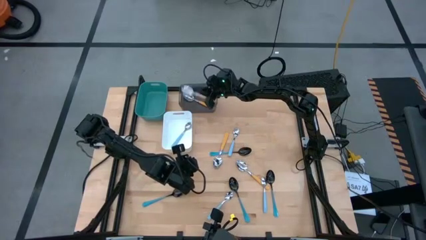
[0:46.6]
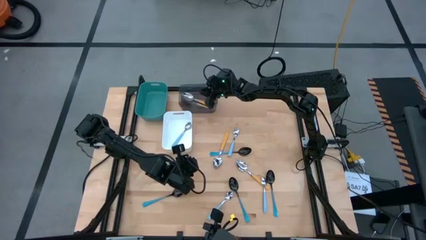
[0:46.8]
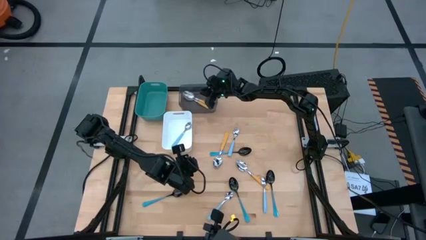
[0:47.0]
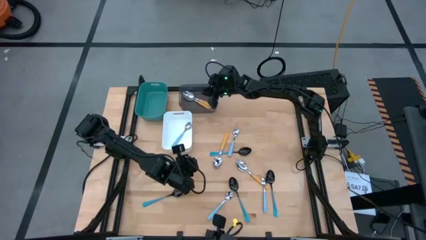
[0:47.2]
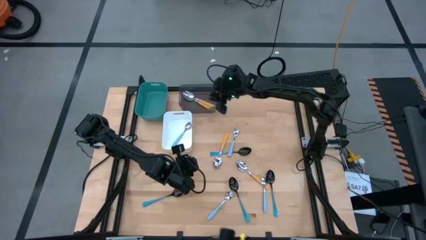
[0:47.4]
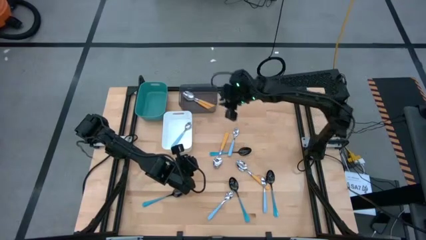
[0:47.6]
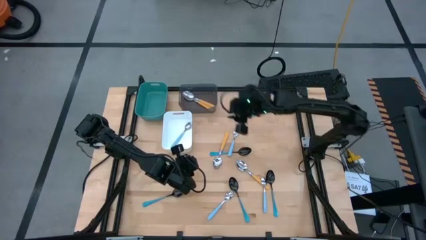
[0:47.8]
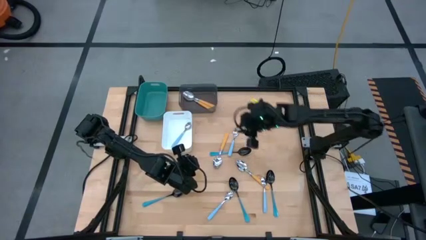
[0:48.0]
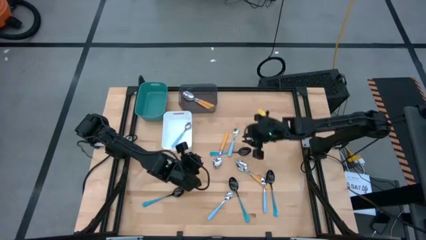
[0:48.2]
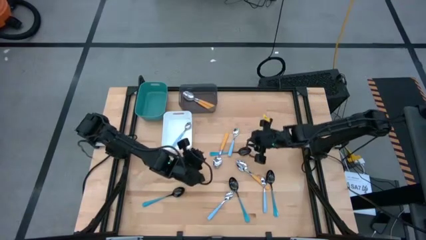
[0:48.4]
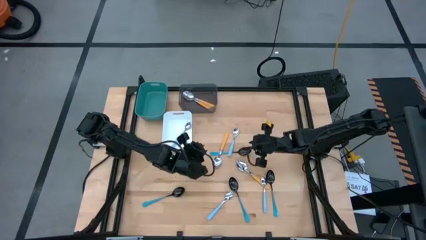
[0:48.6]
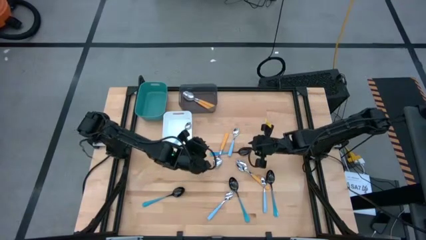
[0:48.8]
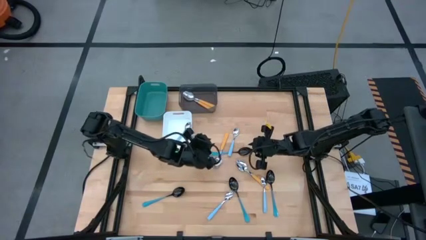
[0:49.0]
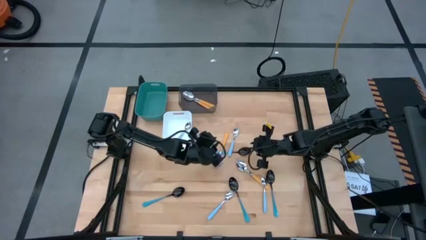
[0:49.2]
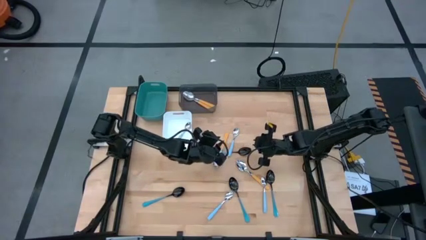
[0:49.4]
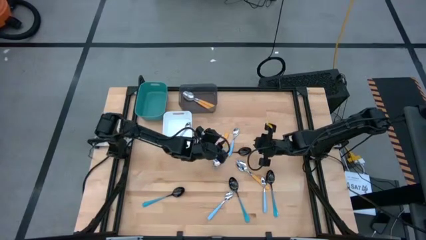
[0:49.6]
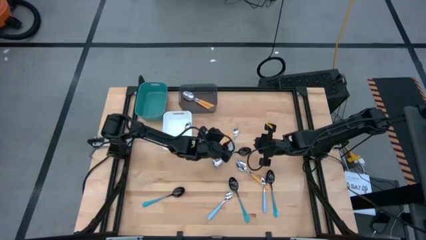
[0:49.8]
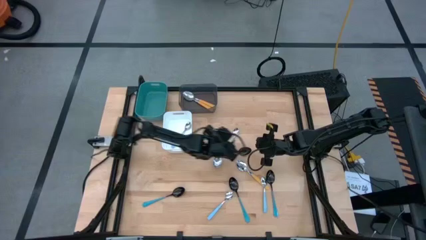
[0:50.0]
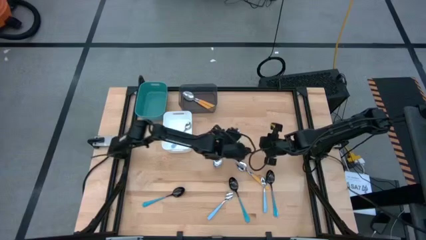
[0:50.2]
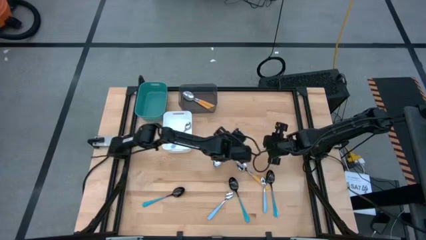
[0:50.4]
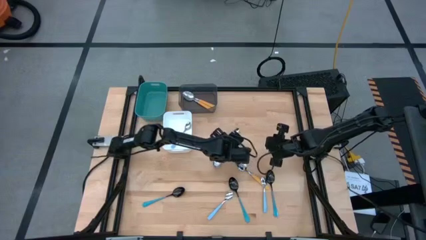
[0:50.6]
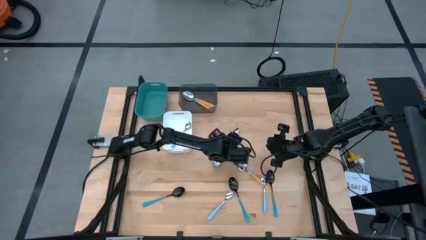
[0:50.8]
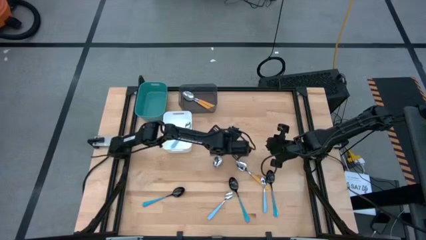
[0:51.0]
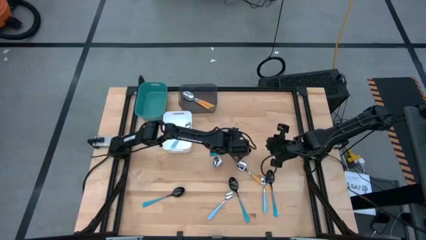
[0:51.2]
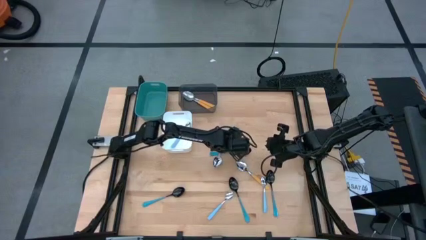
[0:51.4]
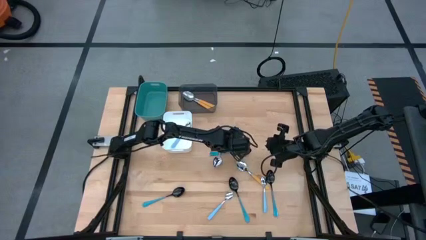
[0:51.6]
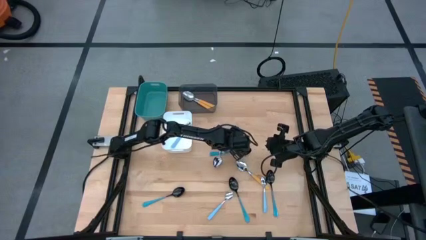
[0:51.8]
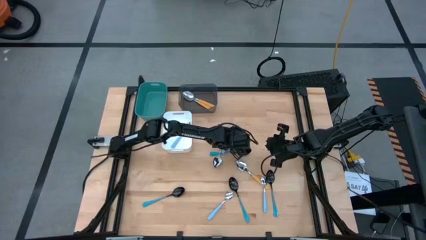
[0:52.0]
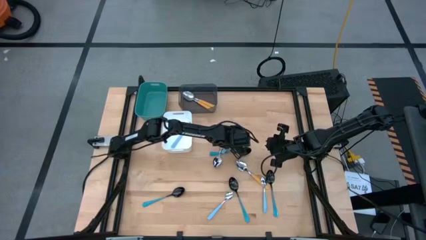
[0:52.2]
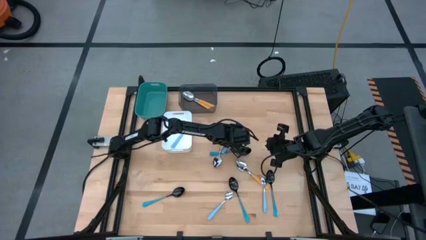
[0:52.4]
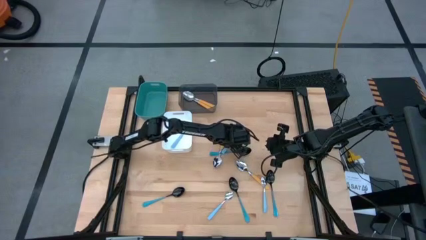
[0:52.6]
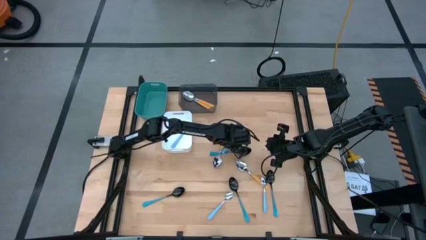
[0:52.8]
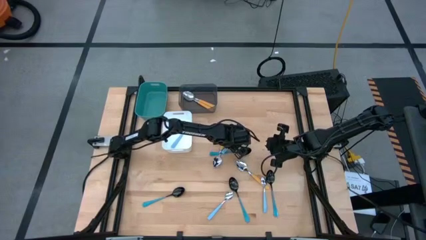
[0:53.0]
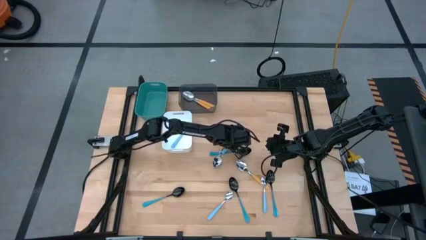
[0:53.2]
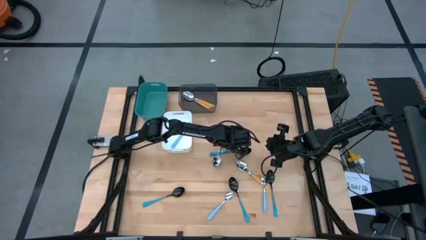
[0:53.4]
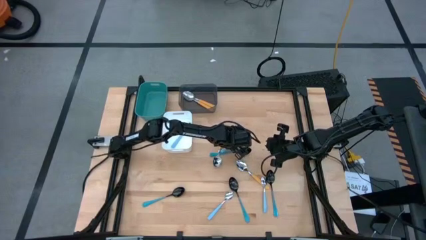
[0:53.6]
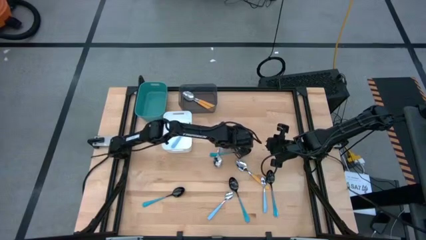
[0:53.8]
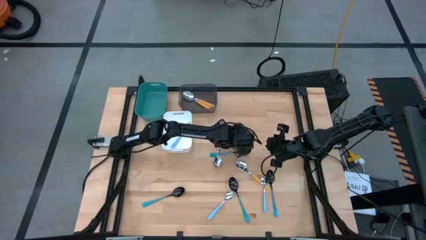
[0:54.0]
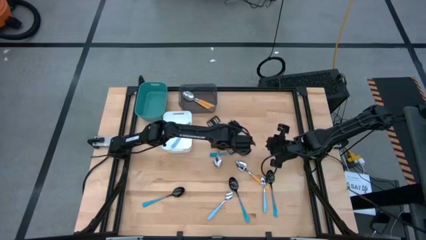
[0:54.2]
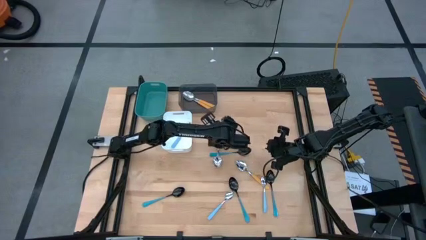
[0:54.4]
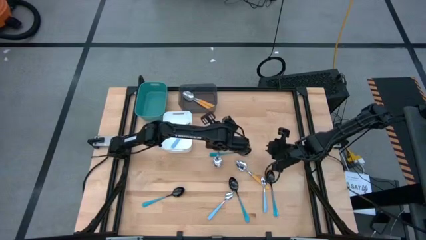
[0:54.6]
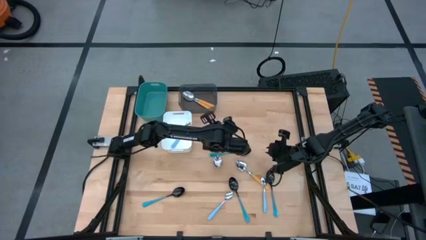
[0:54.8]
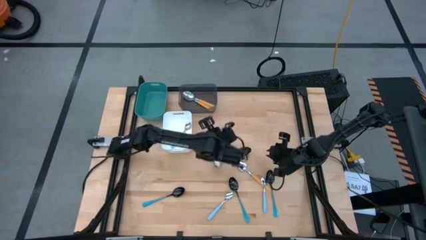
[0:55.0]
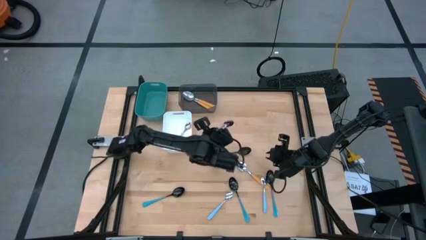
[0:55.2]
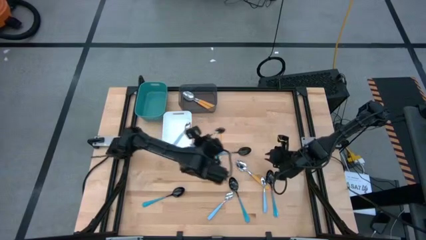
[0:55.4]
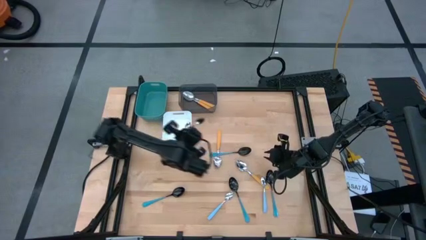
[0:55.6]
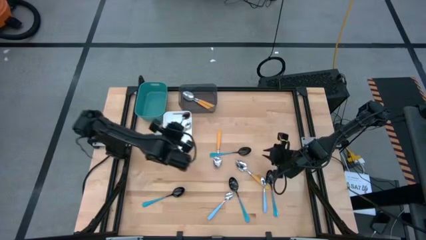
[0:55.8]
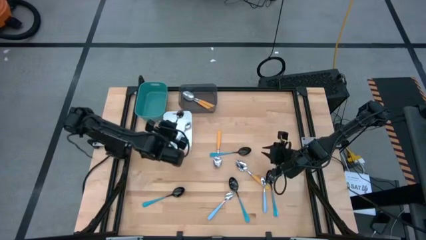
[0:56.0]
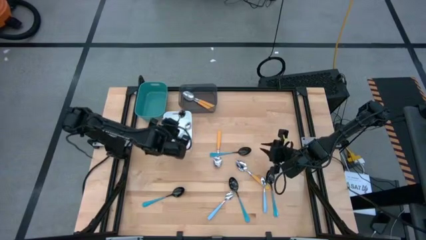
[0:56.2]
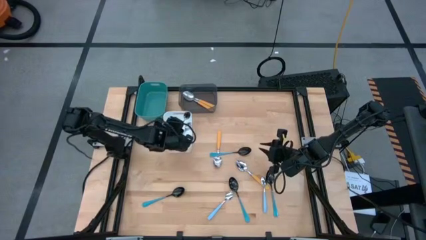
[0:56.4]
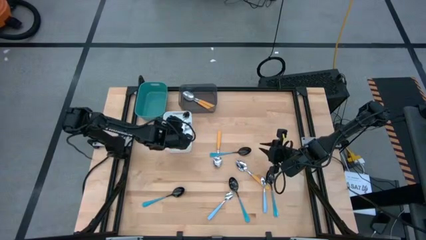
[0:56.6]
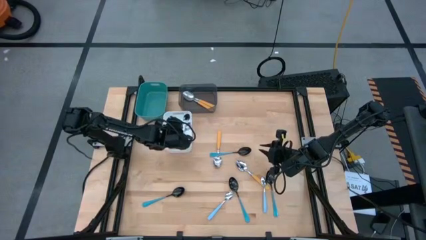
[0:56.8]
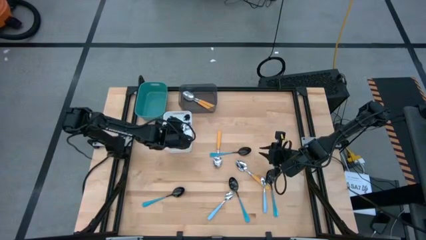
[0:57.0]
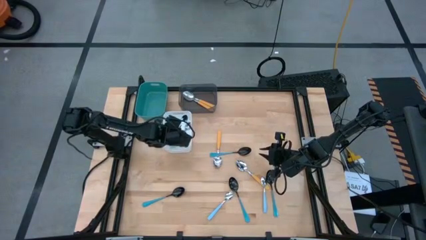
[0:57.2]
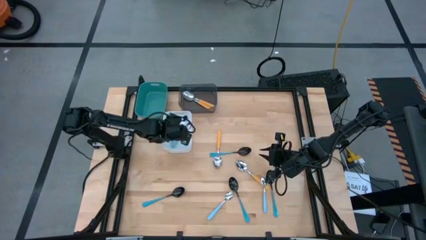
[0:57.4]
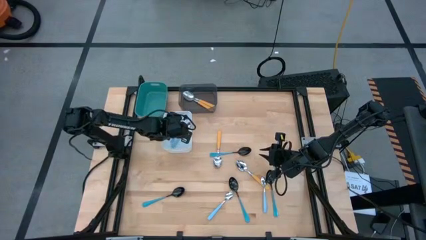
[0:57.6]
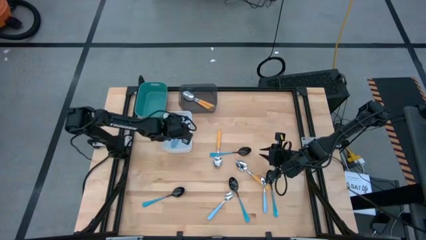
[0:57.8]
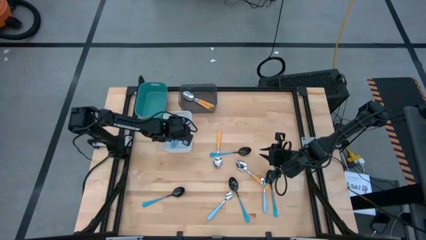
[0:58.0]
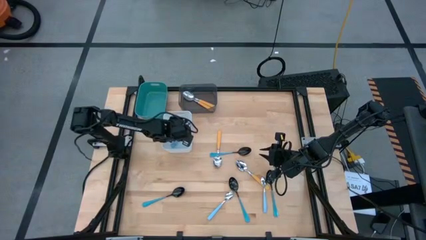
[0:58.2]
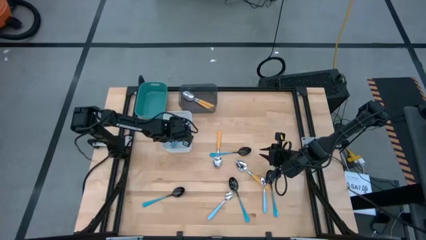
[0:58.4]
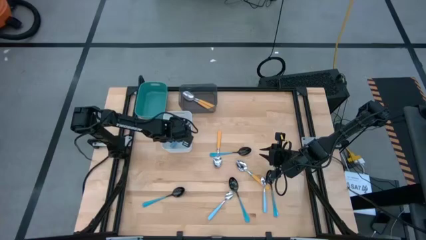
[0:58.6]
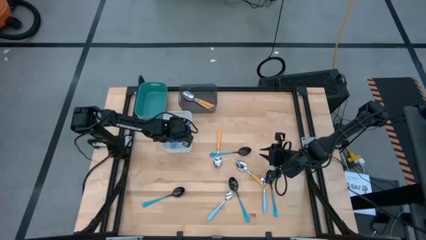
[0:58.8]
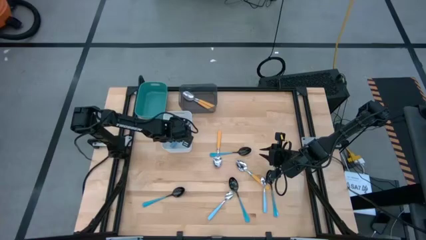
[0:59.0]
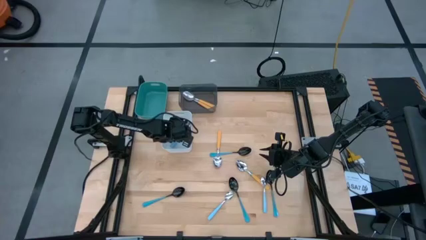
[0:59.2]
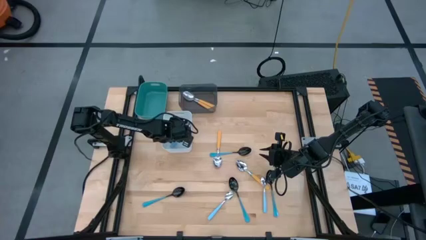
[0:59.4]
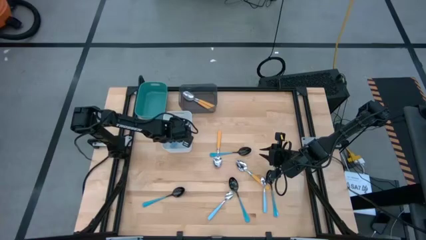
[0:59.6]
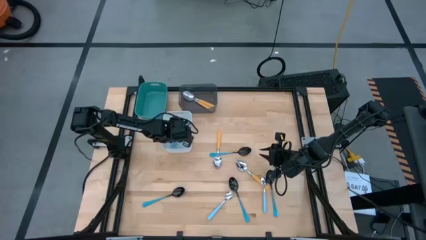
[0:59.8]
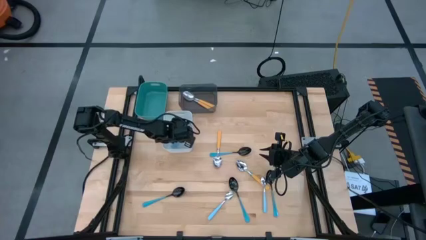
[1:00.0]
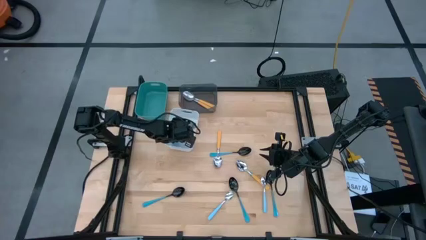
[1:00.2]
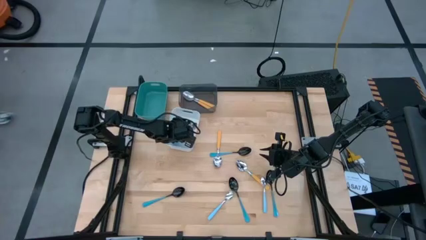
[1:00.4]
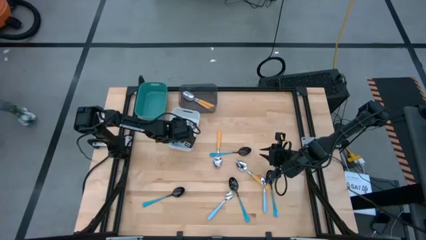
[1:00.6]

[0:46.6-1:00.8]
Task: Sort silverware by color (type)
Put the top light blue spoon into the white bin

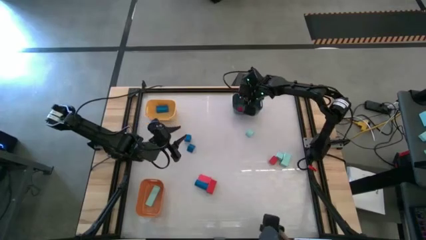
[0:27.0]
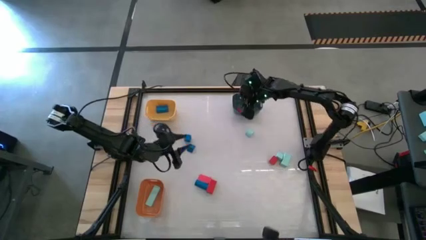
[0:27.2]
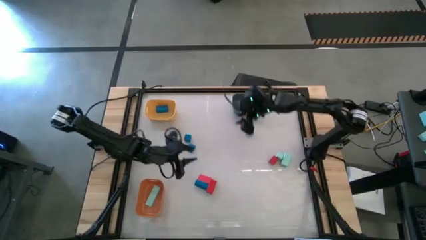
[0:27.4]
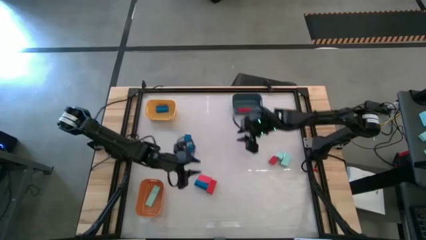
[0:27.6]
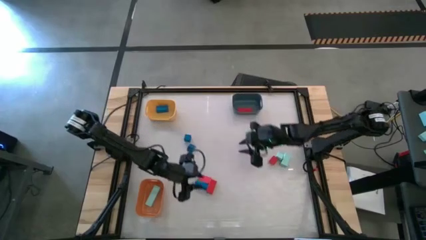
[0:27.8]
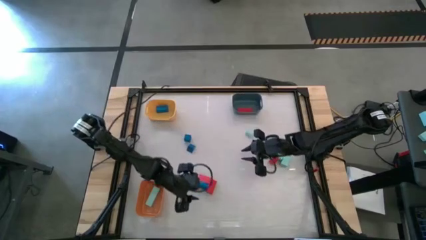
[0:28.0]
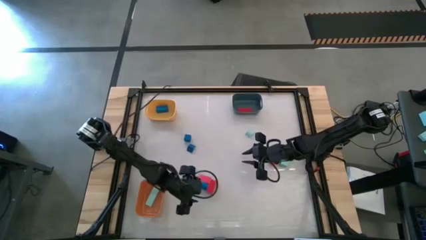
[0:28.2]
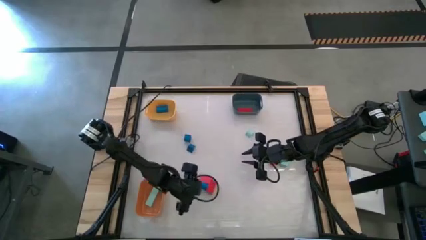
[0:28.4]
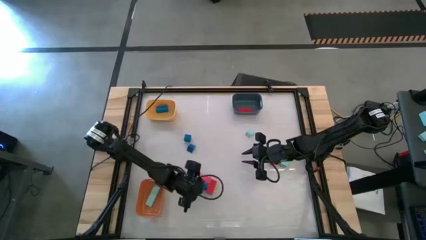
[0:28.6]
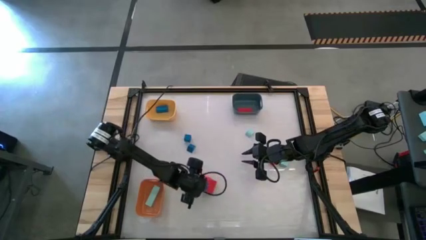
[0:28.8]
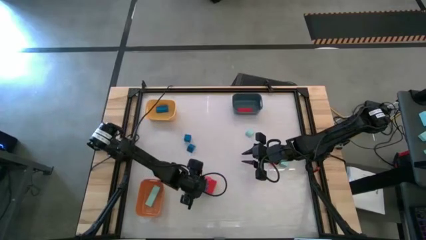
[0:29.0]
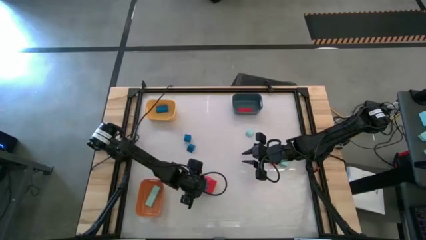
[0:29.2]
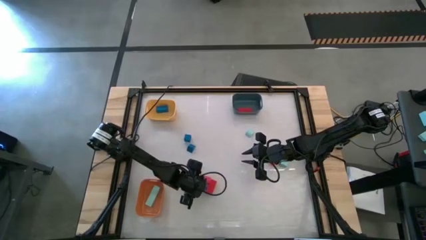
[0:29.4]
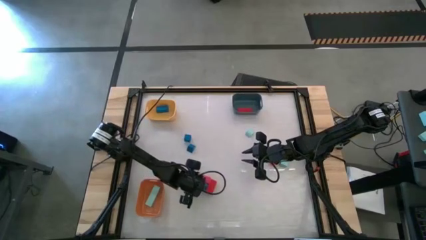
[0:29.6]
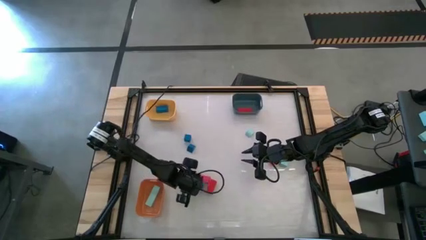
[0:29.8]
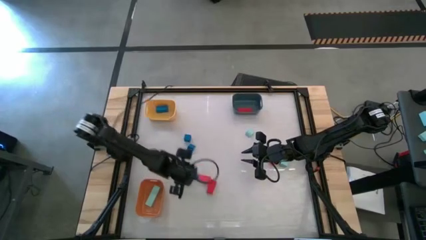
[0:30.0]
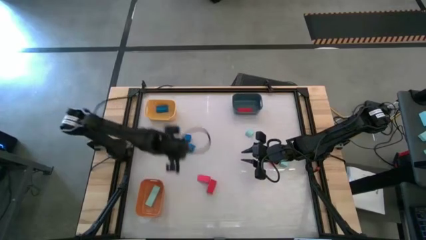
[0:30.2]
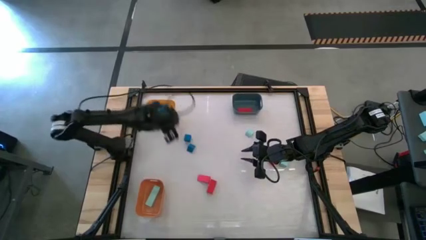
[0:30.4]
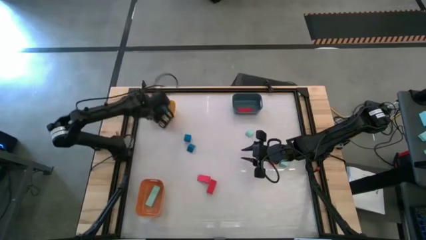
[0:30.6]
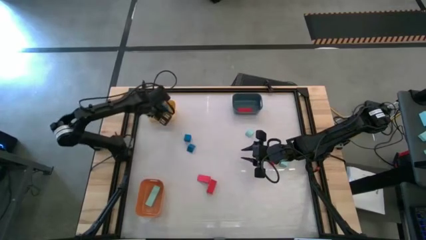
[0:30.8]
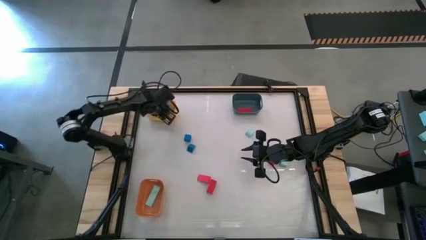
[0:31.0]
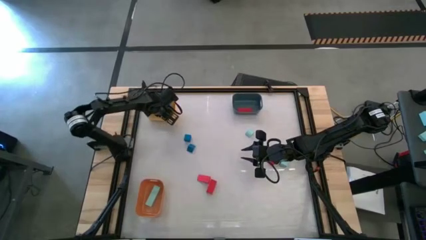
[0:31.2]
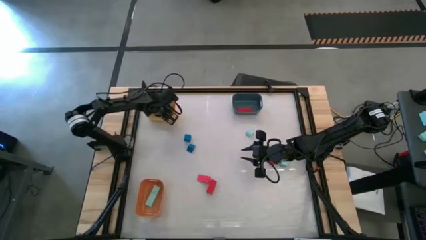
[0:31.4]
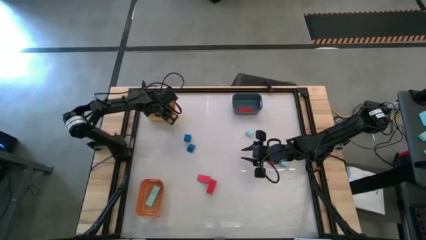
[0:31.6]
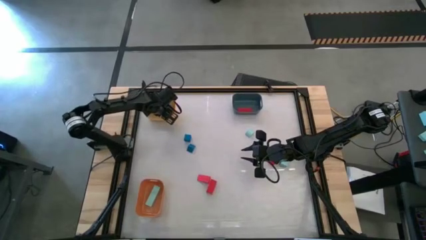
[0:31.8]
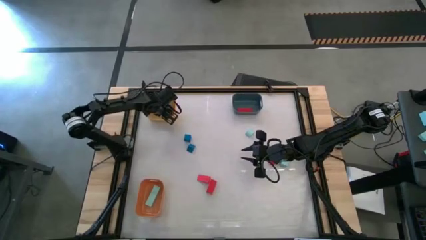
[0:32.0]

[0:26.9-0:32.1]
Task: Sort & place blocks by color
Put the bottom blue block into the yellow bin
